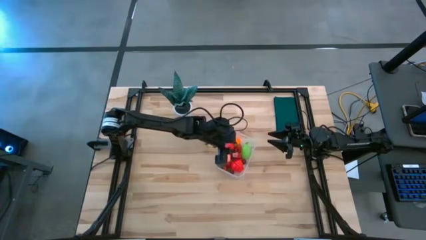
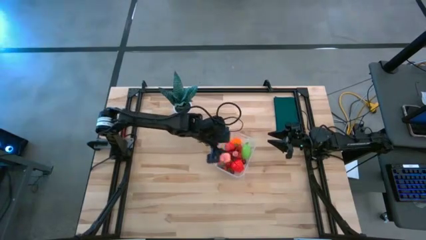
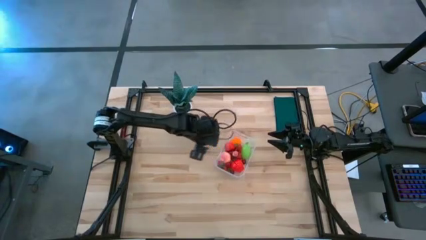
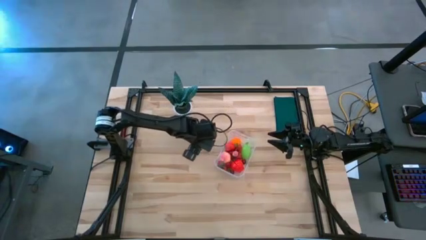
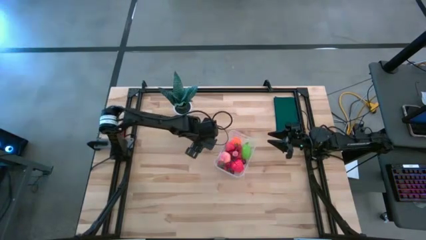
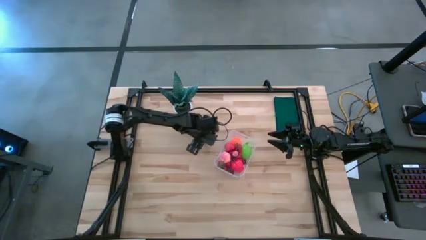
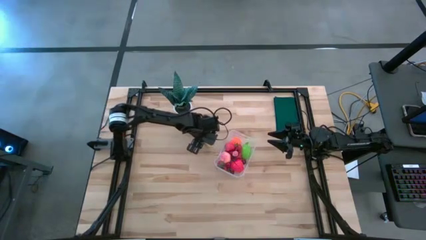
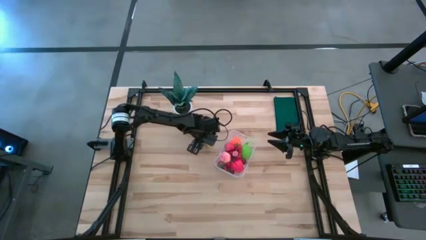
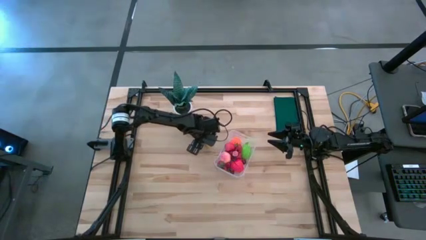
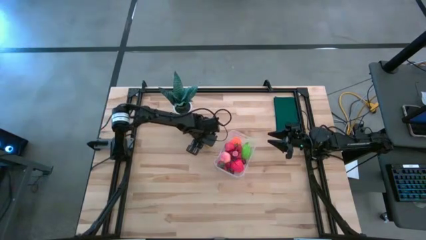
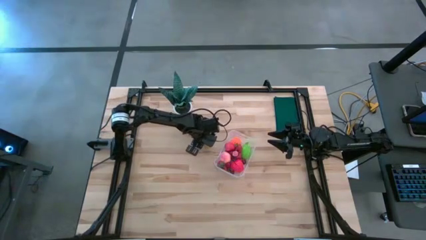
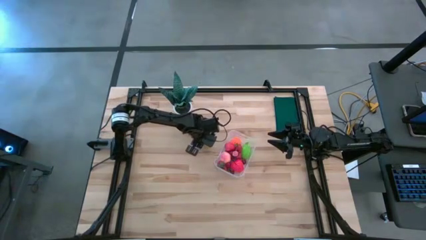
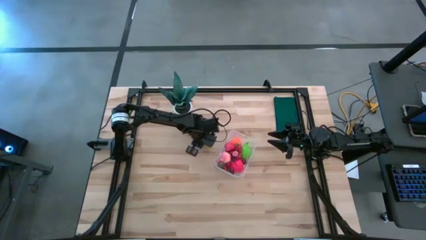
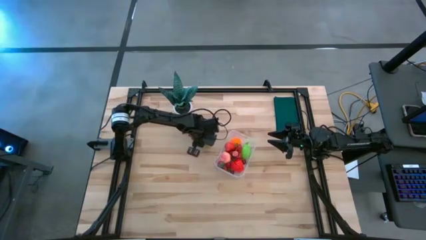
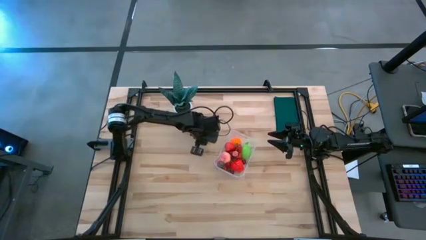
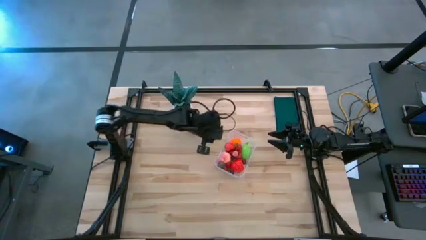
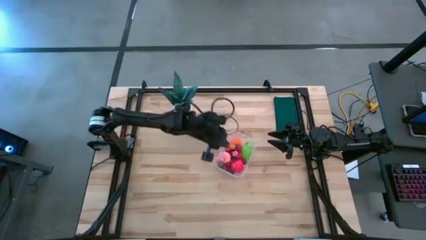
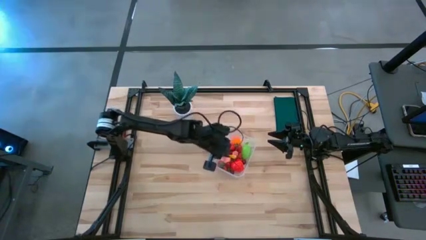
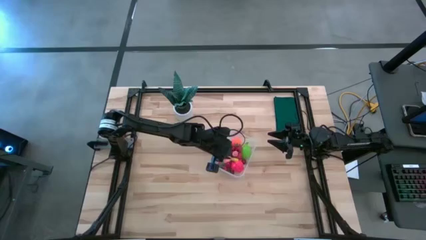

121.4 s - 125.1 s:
Task: Pick and placing Produce into tupperware
Put the yellow corn into the container

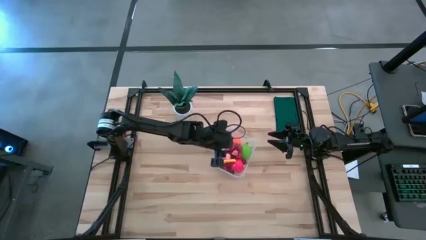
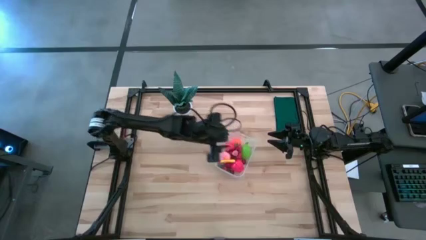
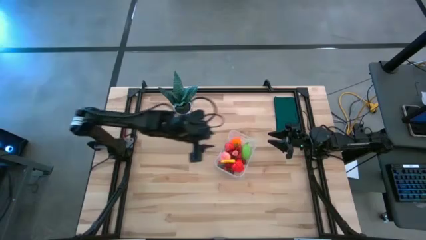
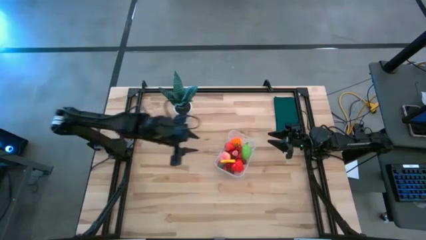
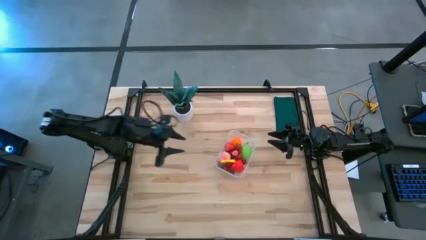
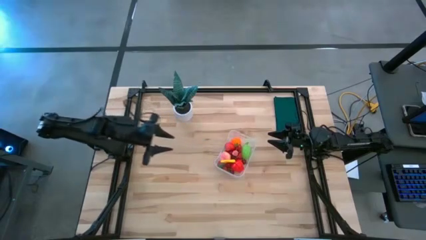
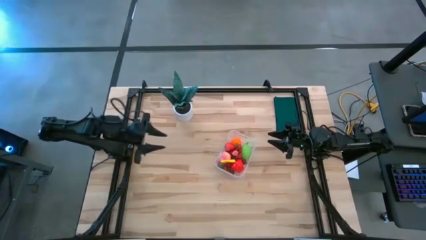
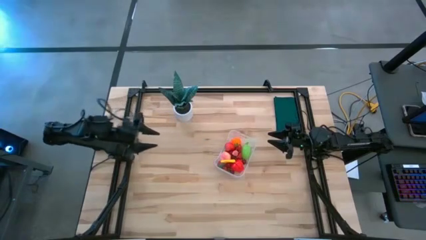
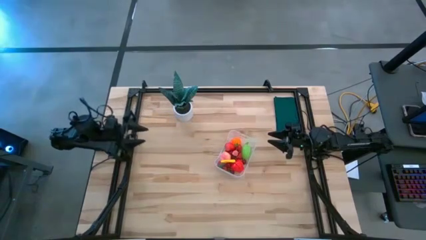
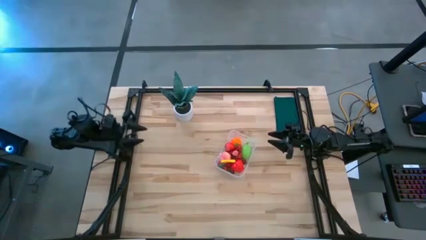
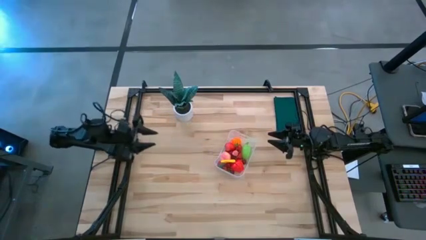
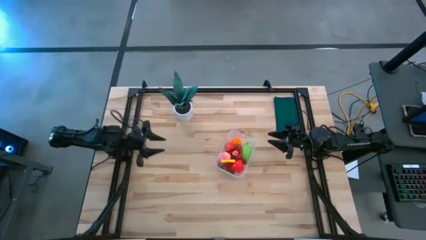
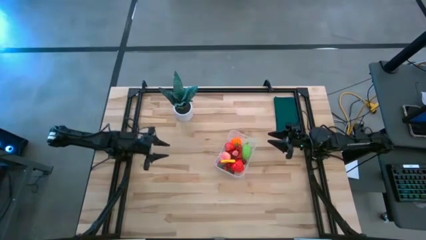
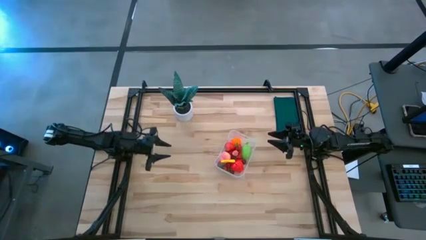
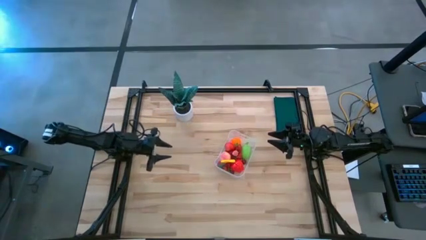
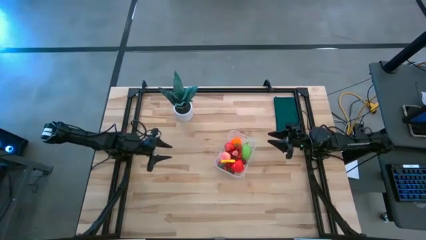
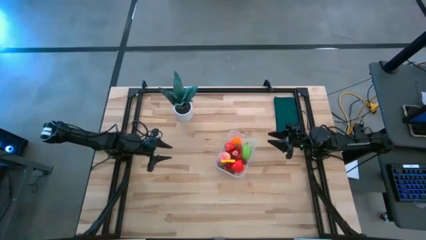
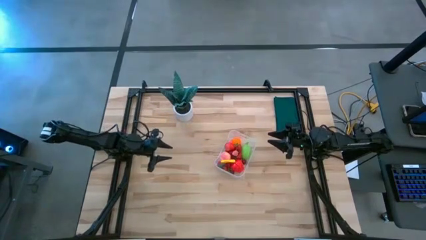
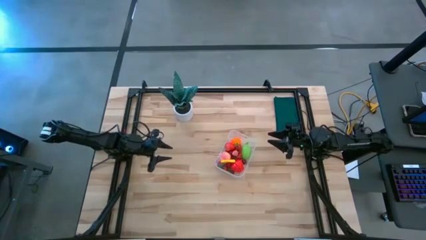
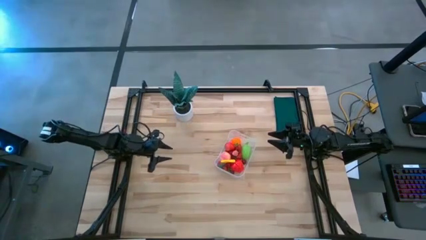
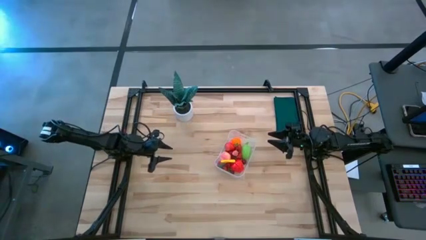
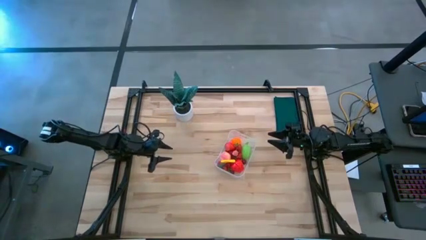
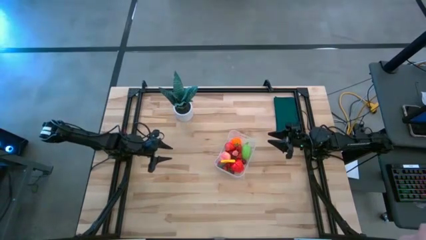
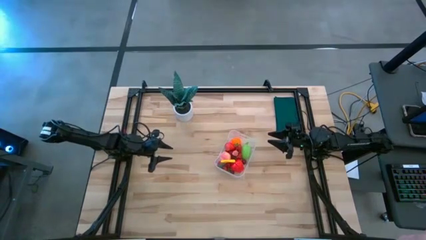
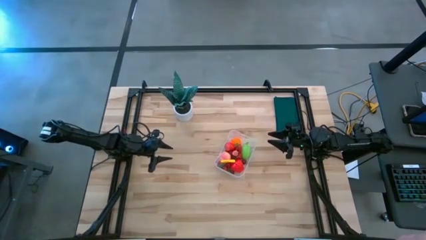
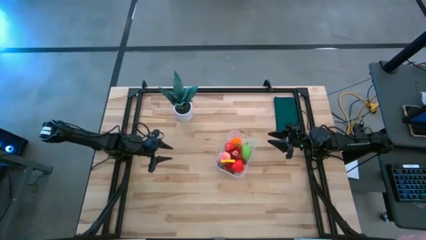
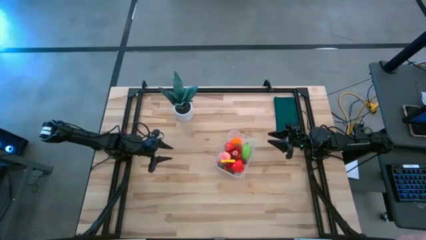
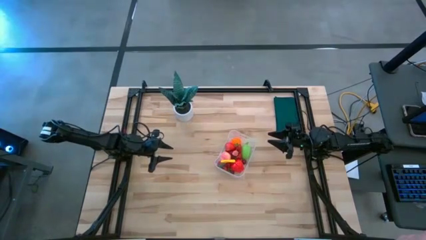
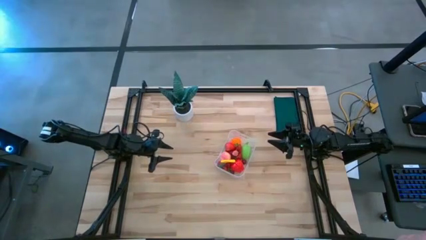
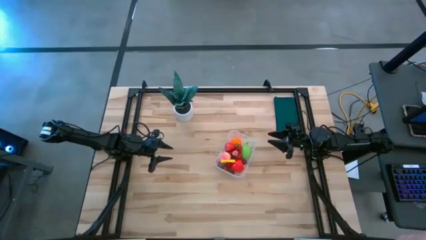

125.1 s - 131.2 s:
Return to Home Position

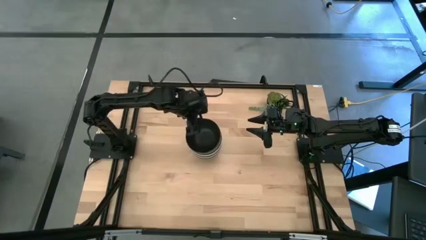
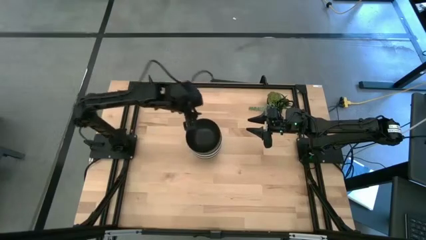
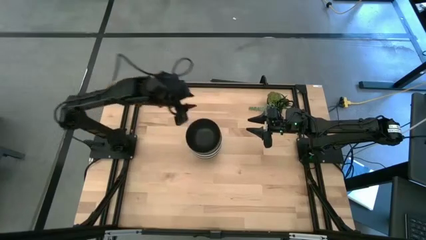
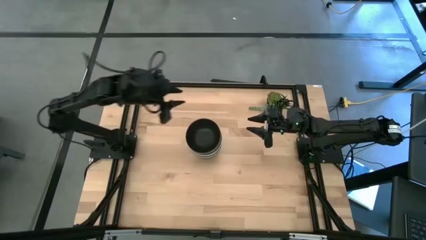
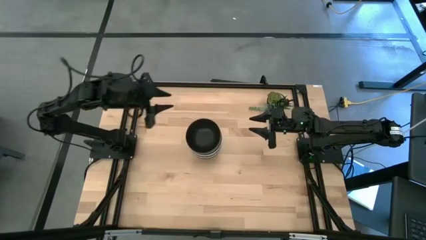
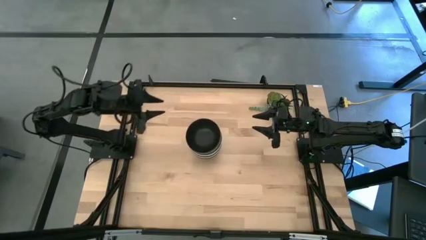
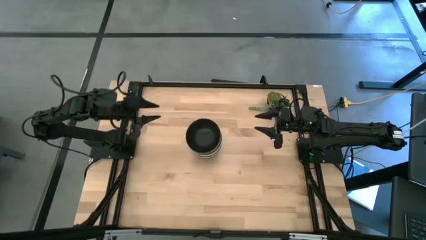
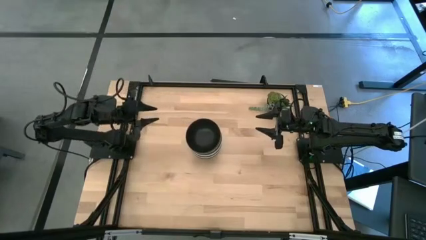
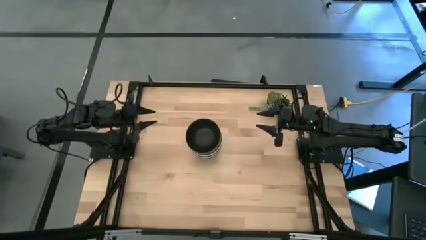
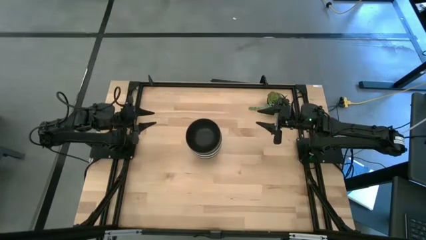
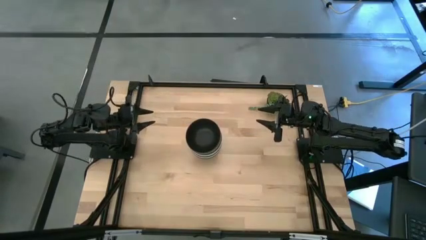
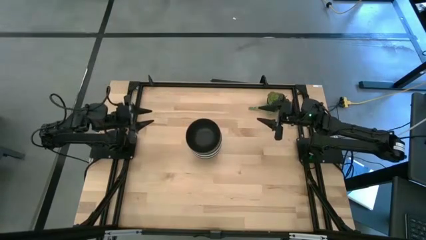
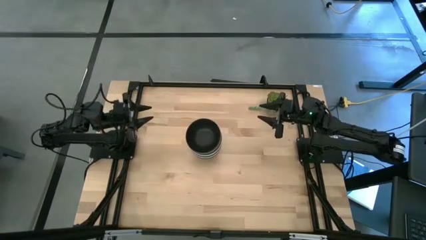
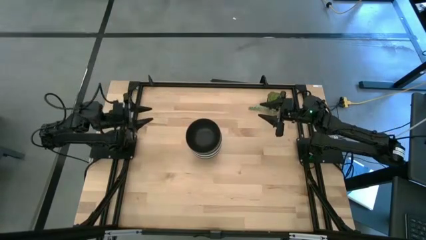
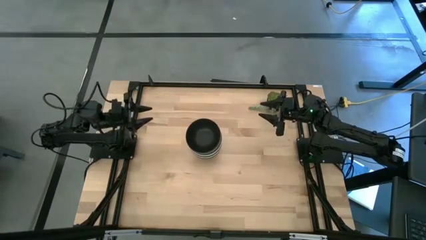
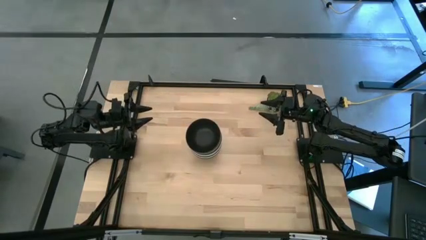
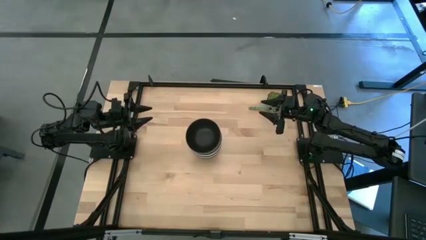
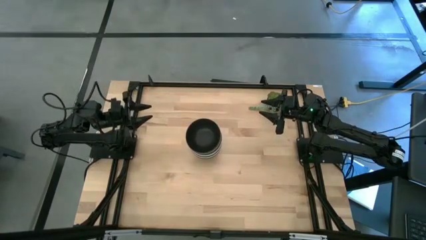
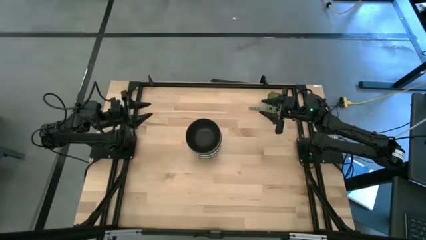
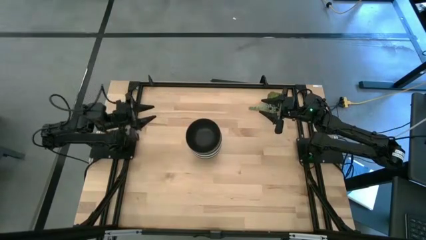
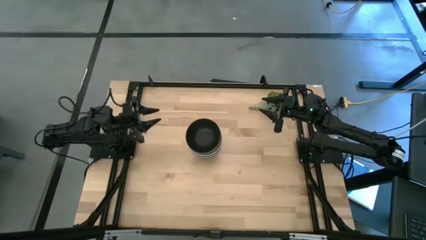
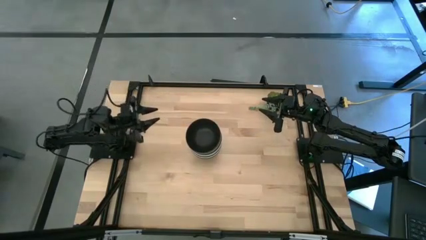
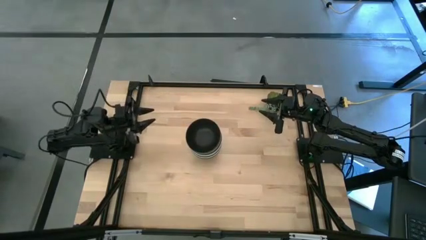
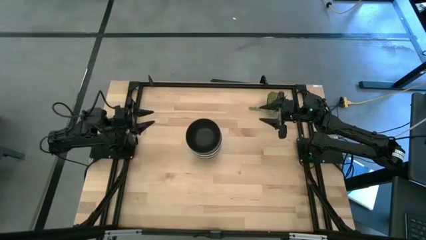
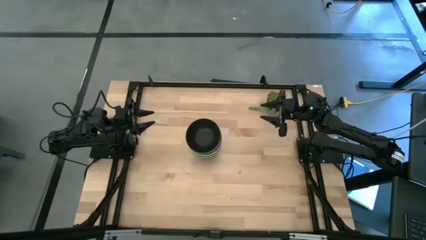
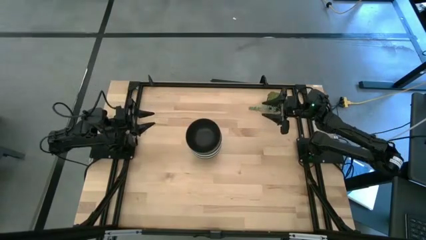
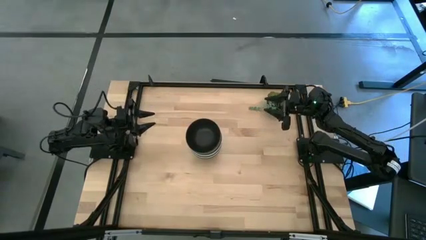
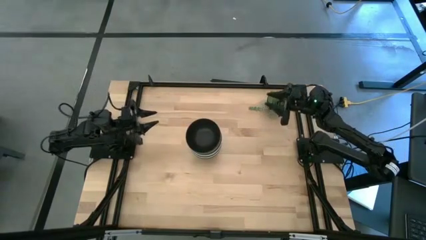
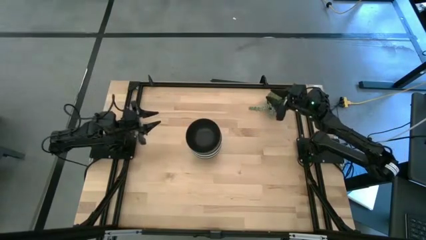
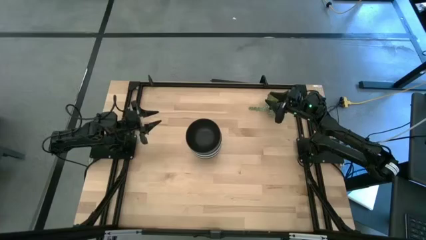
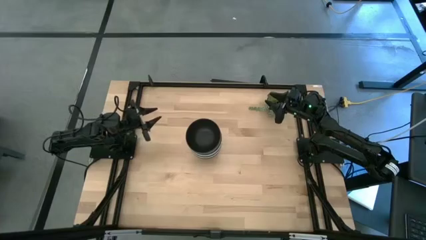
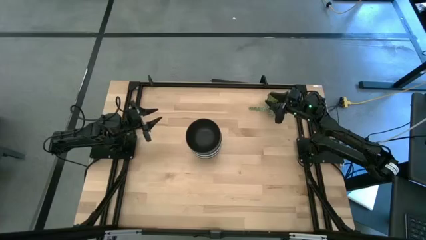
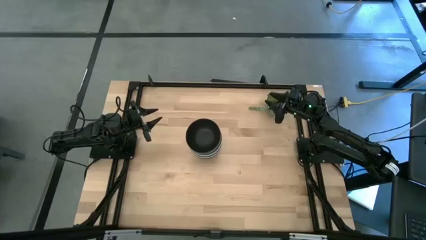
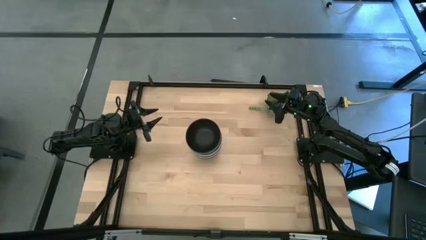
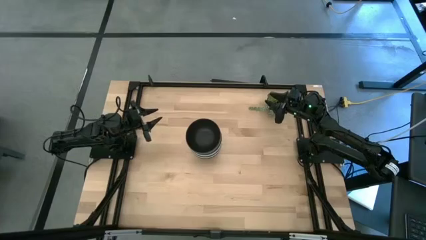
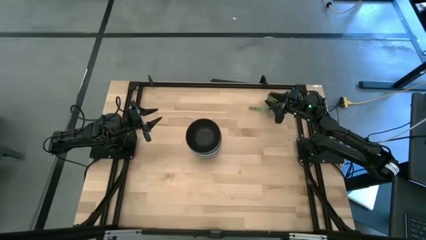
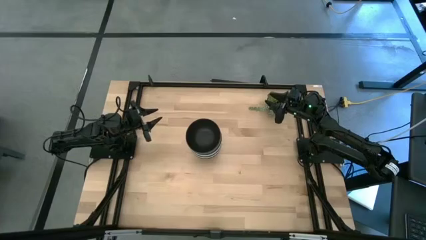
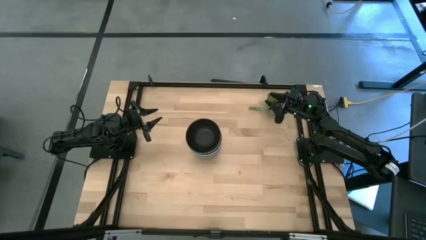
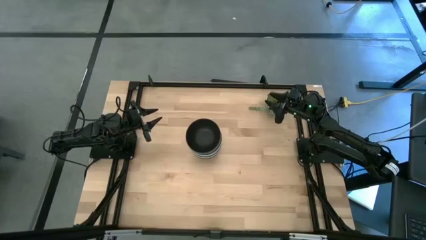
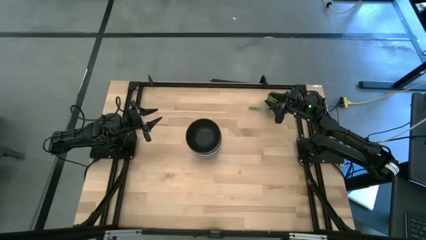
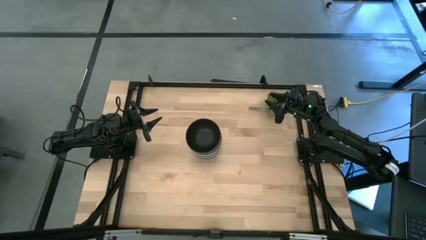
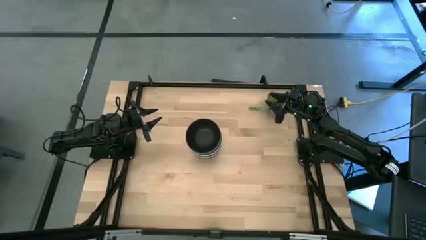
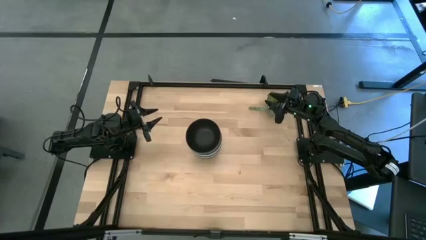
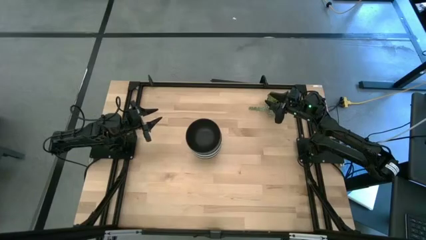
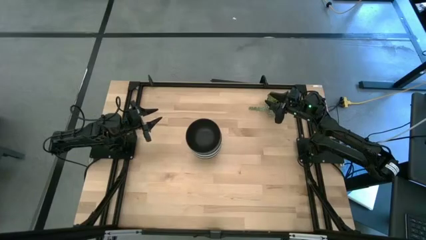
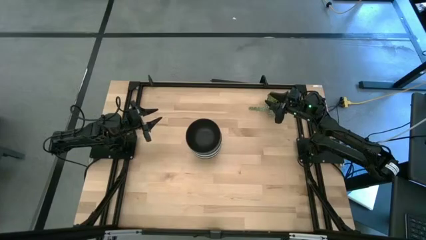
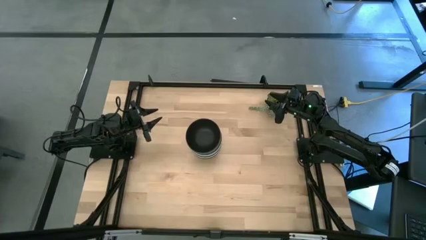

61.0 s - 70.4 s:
Task: Nest bowls inside each other
Return to Home Position
